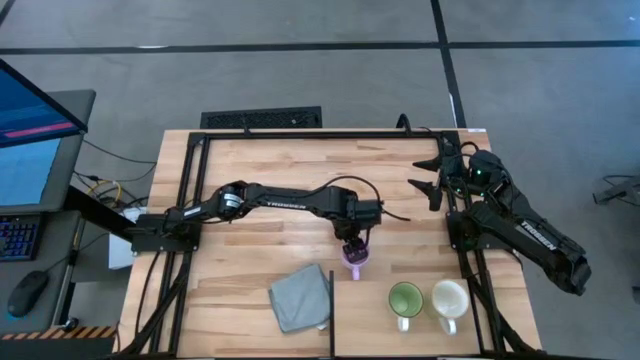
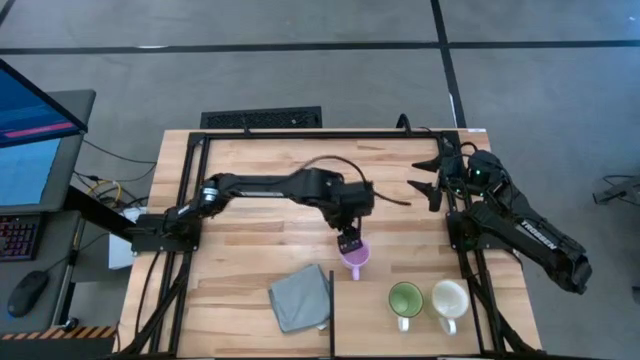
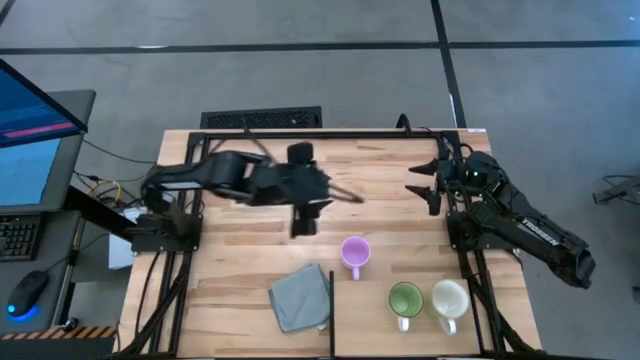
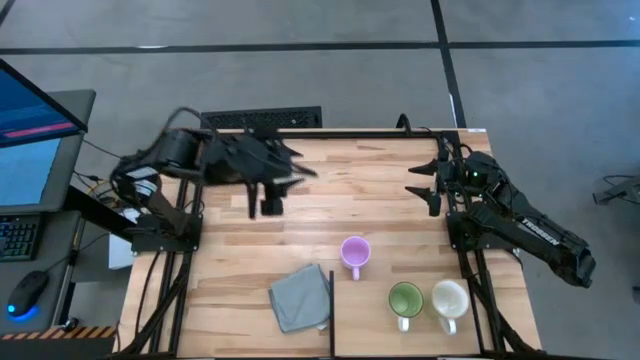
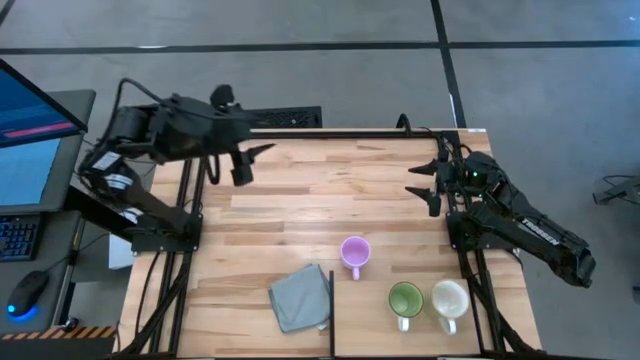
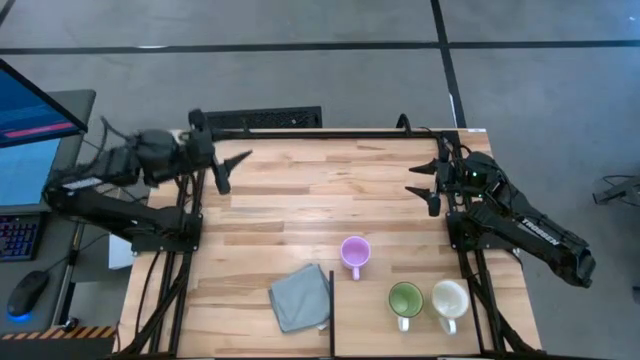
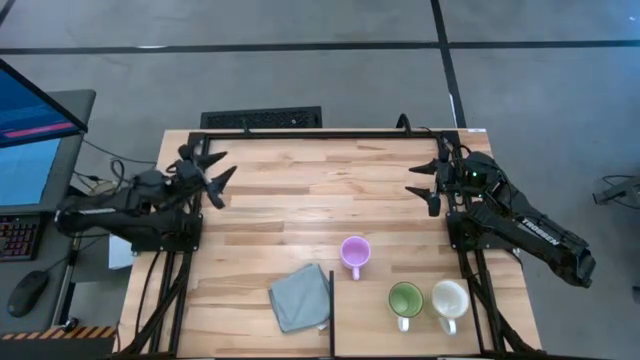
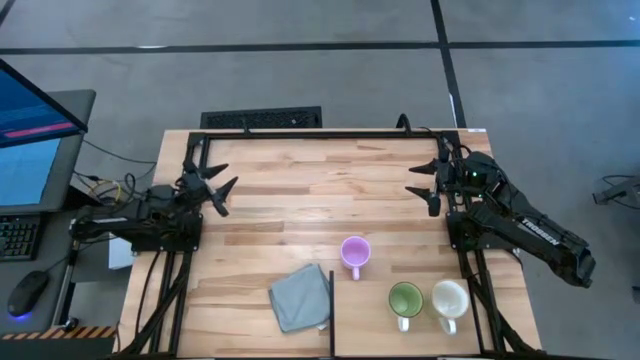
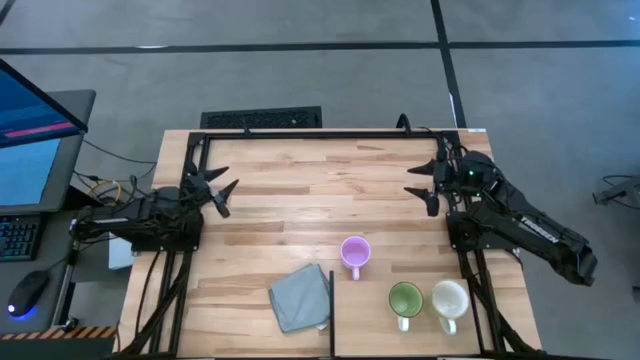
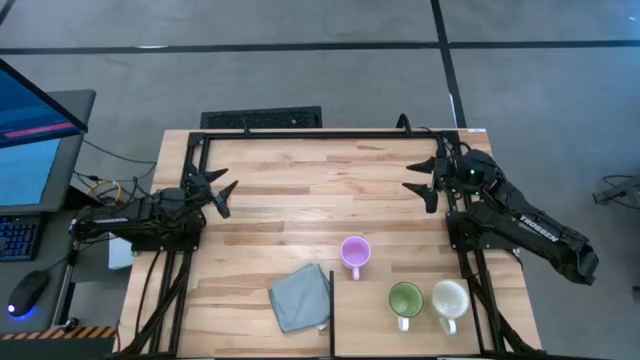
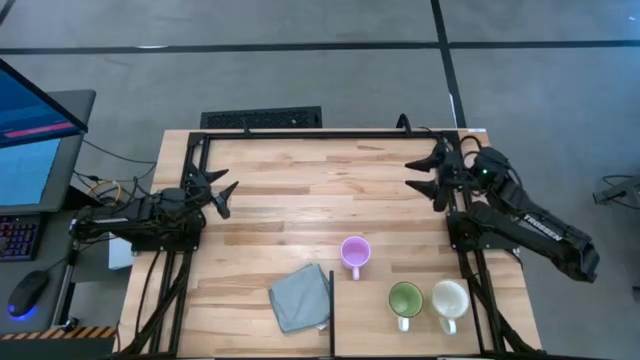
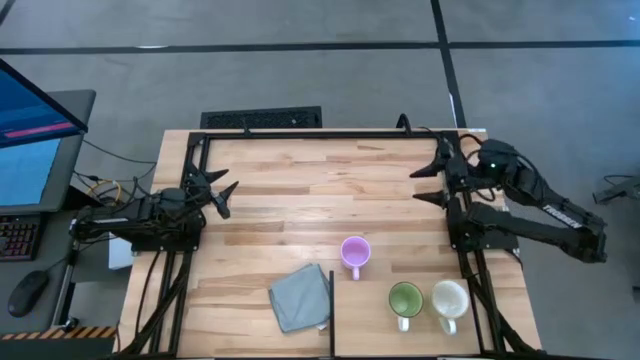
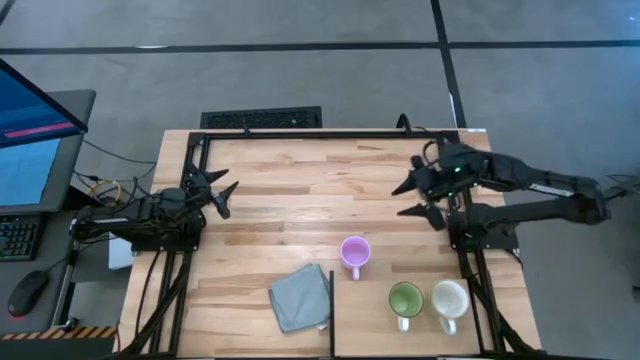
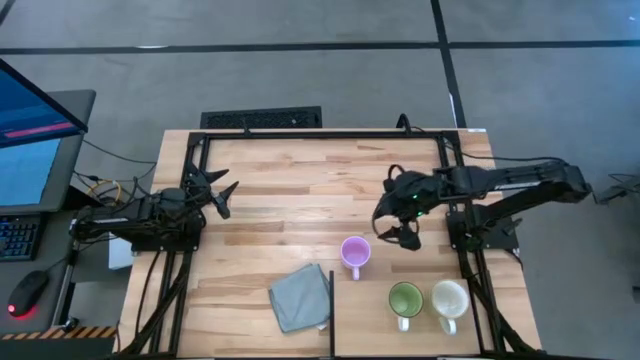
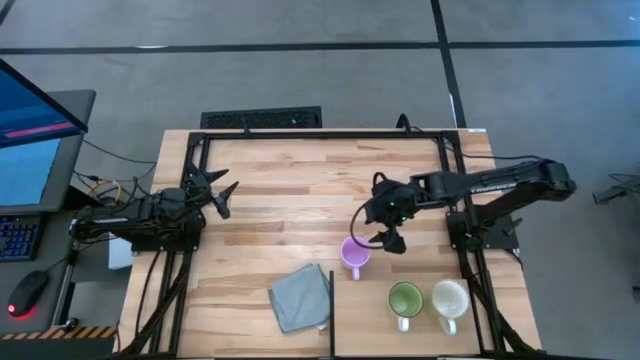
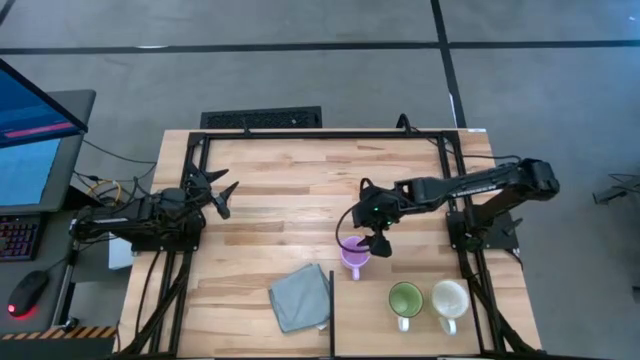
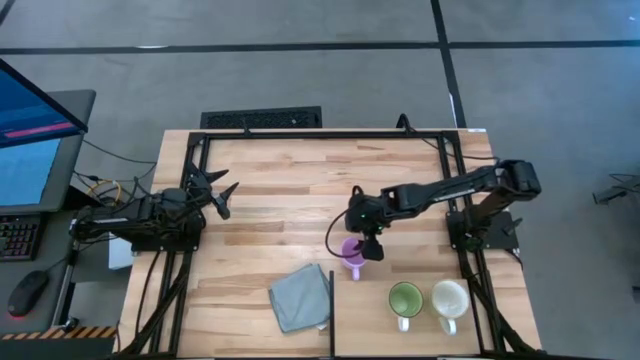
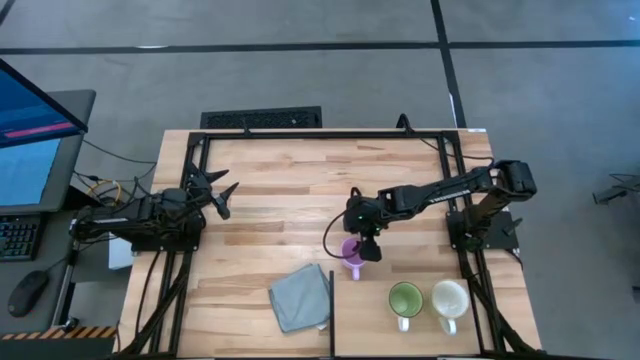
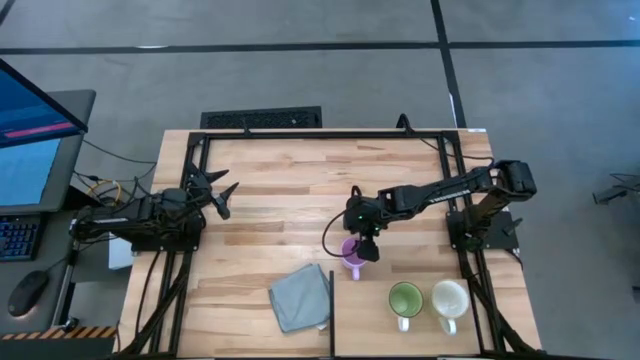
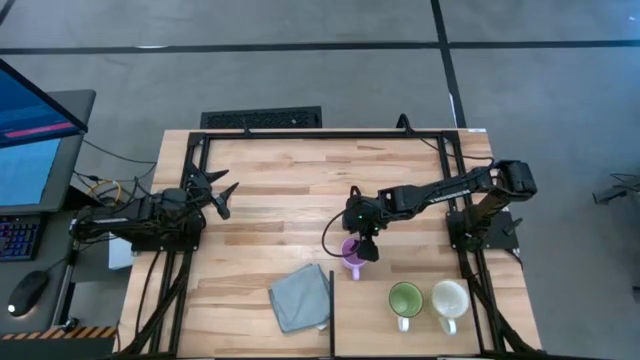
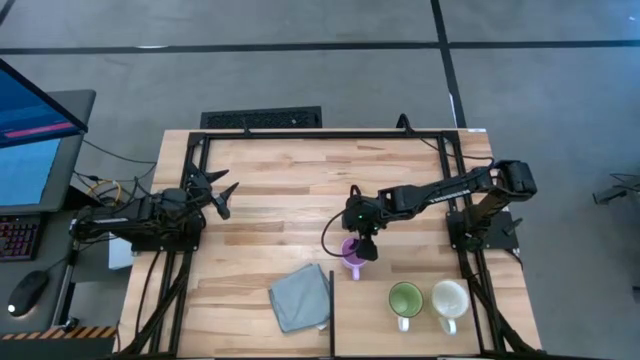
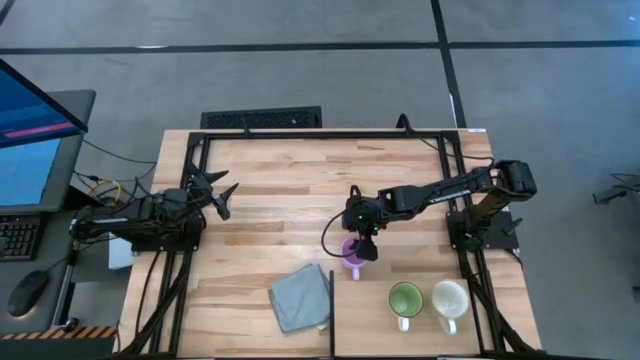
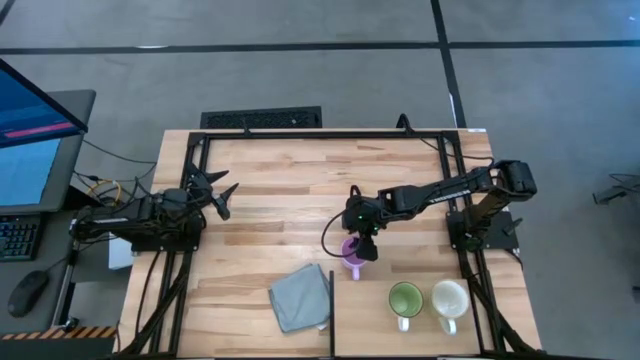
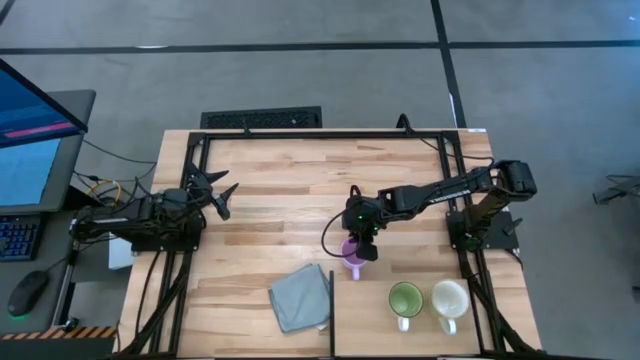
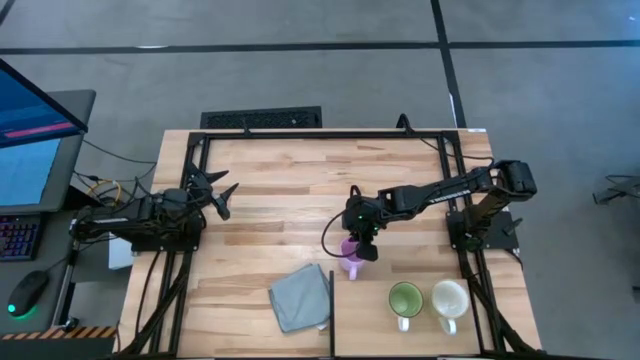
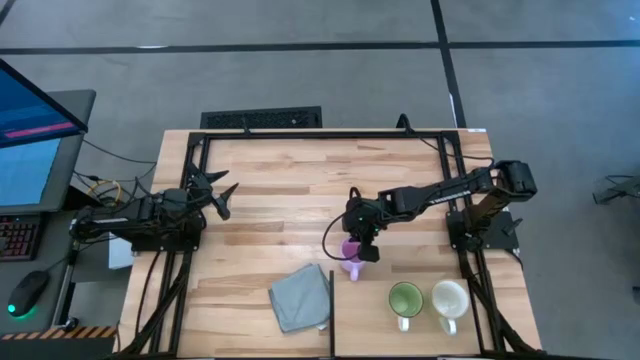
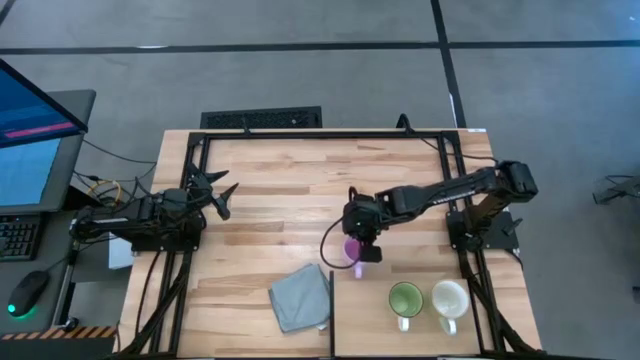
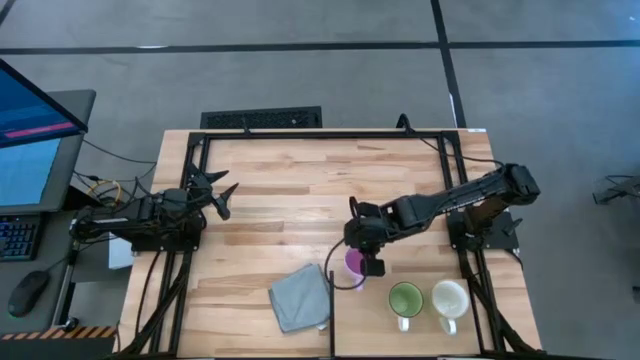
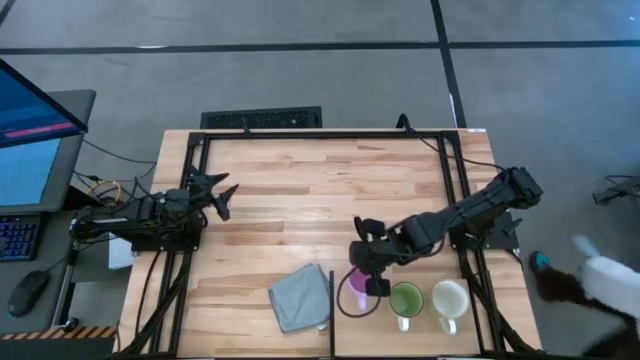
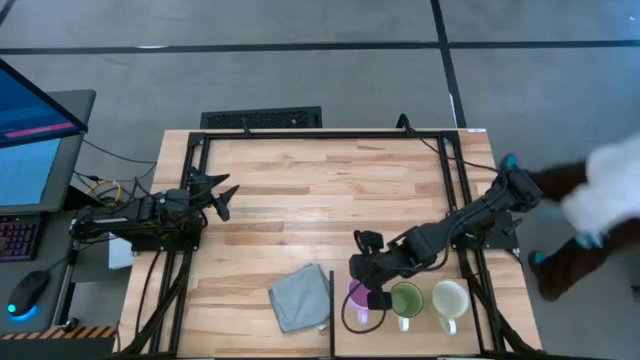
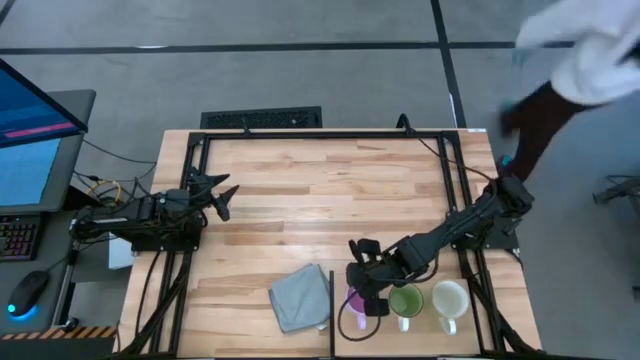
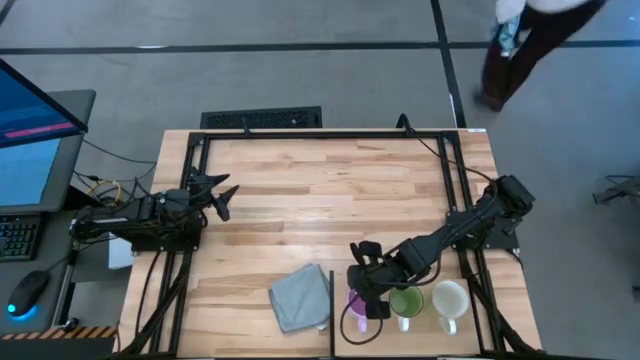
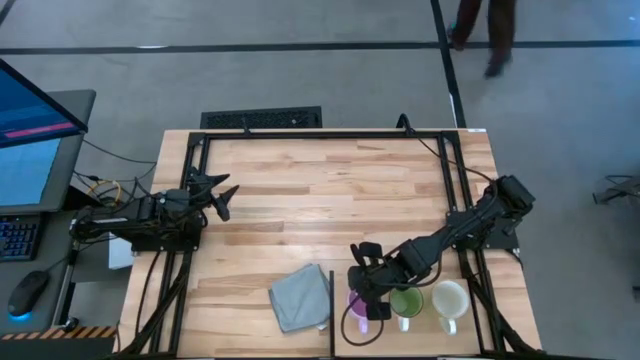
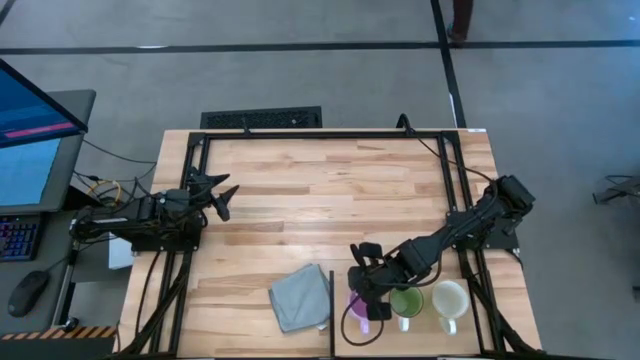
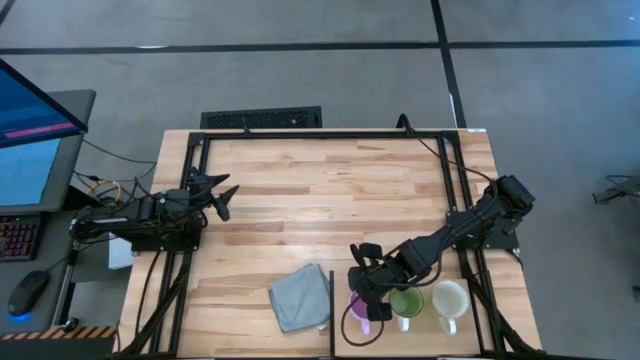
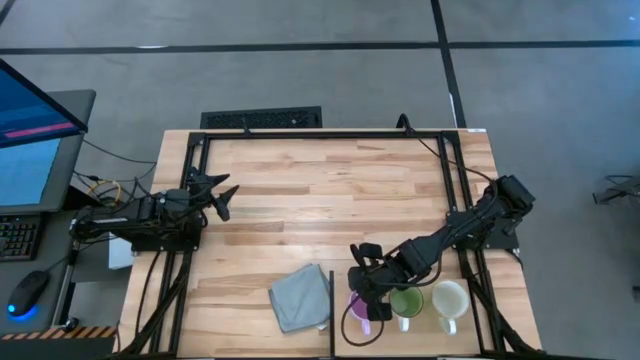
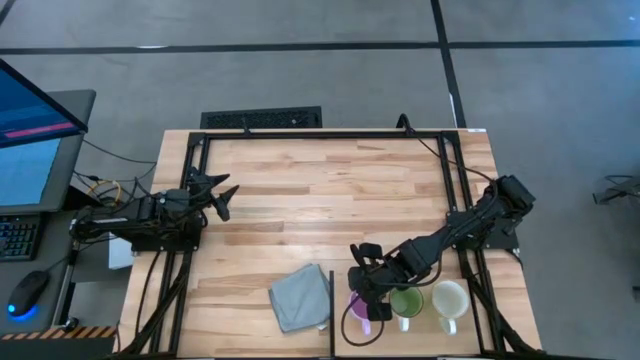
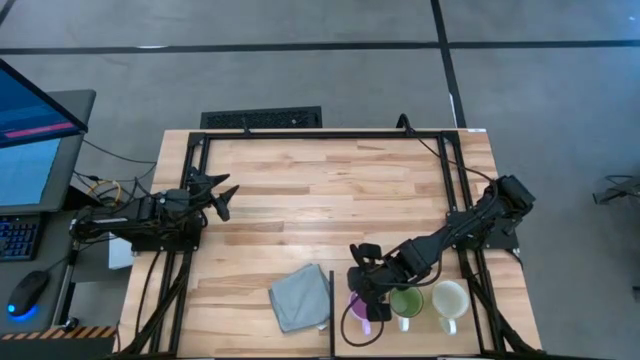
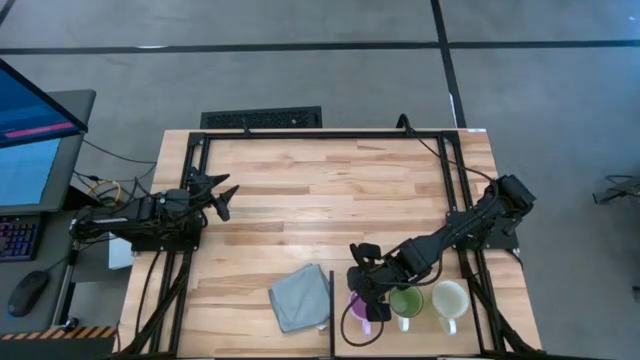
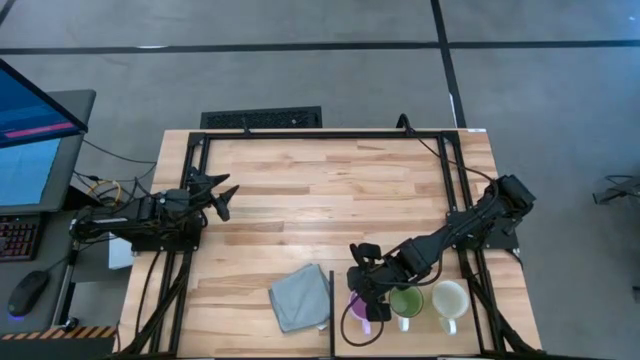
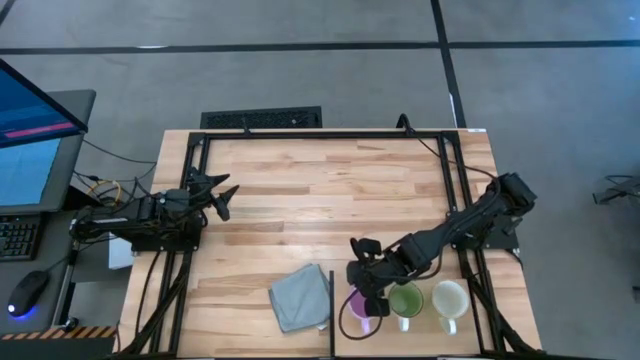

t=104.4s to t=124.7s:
Task: Stack small to large cups/mugs on shelf
Put the pink mug on the shelf

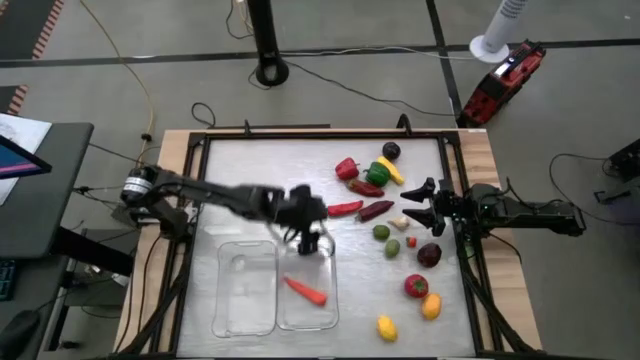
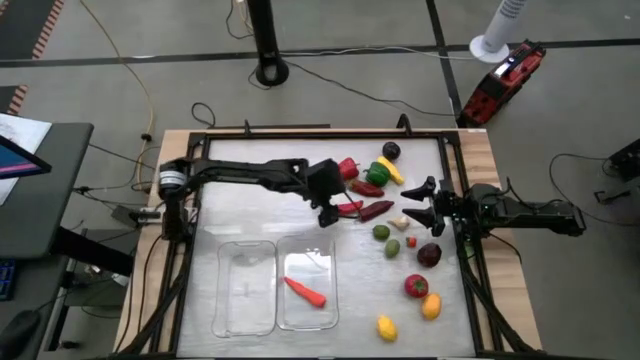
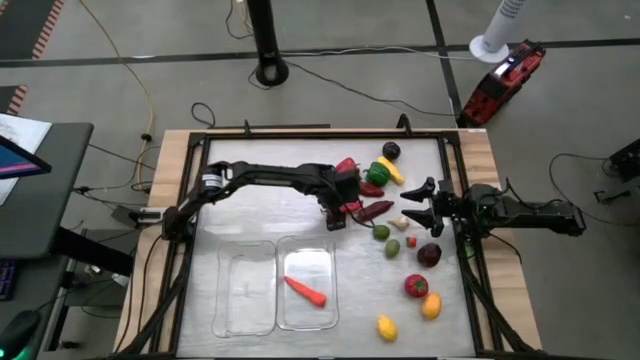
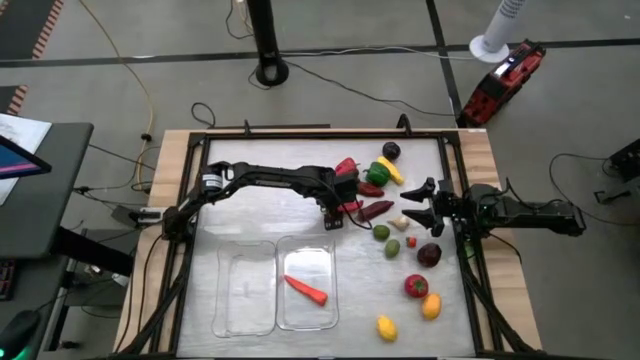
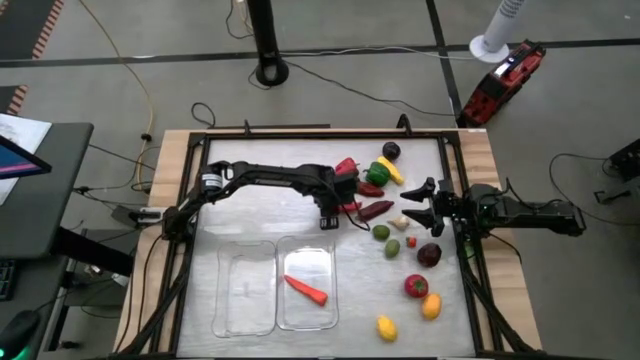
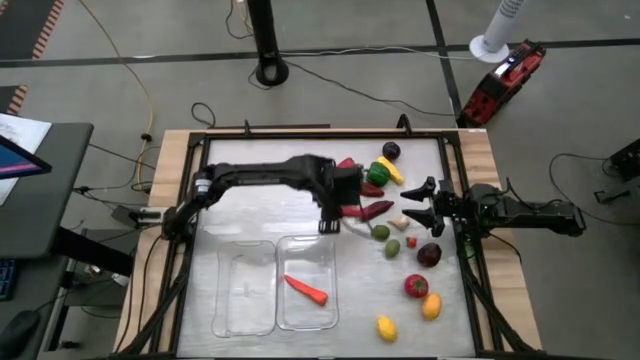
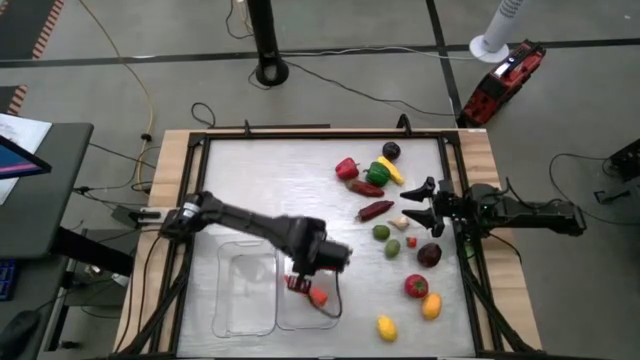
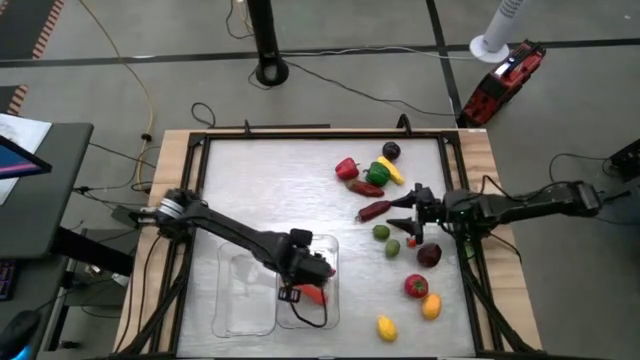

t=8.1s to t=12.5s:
Task: Sort produce into baskets
Put the red chili pepper into the right transparent bin
